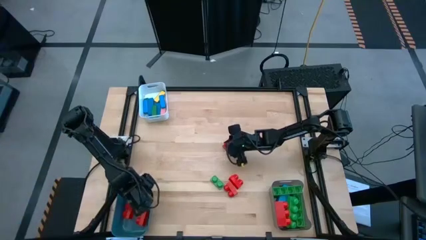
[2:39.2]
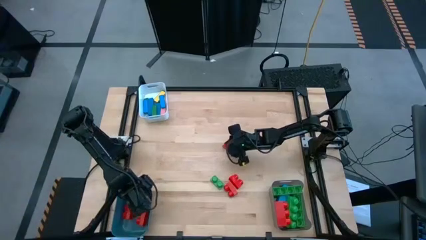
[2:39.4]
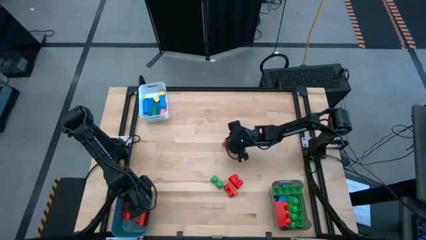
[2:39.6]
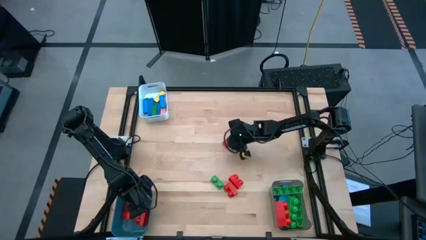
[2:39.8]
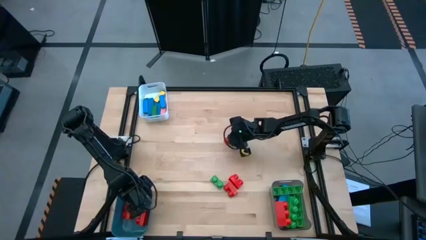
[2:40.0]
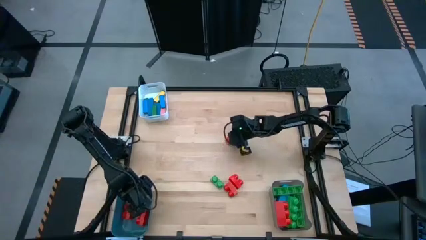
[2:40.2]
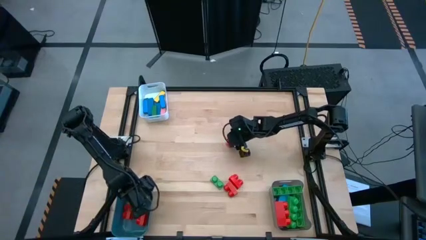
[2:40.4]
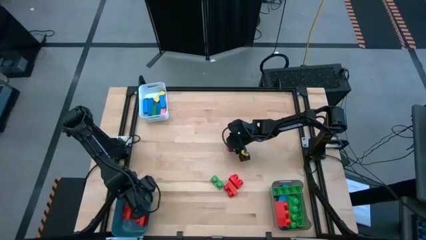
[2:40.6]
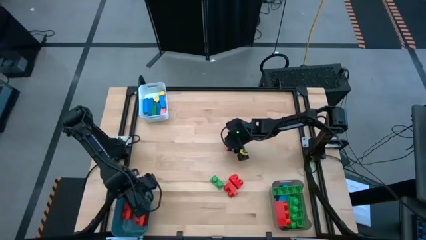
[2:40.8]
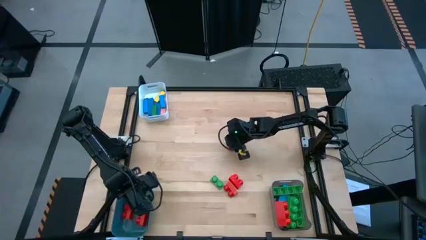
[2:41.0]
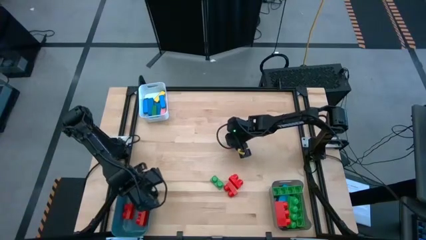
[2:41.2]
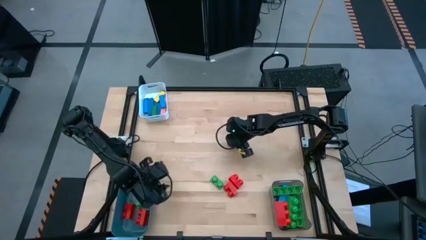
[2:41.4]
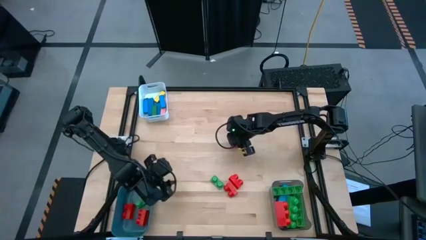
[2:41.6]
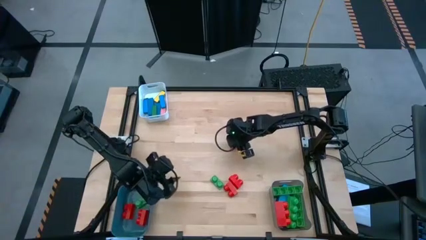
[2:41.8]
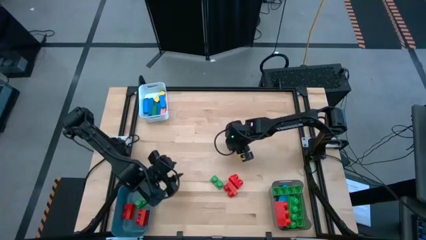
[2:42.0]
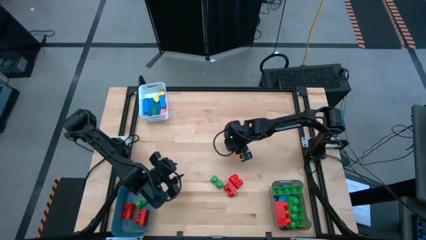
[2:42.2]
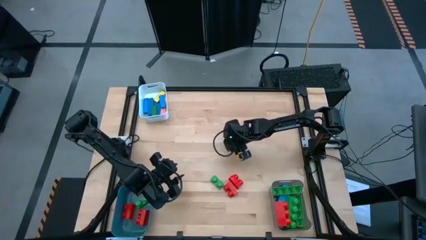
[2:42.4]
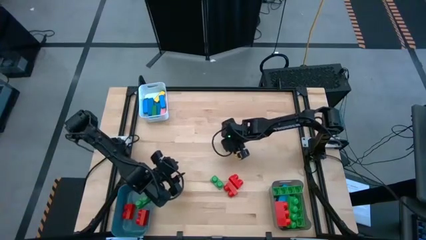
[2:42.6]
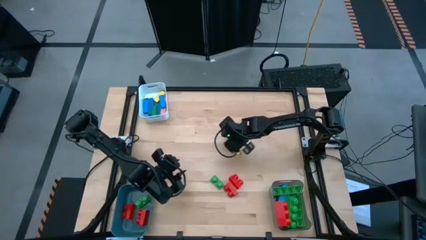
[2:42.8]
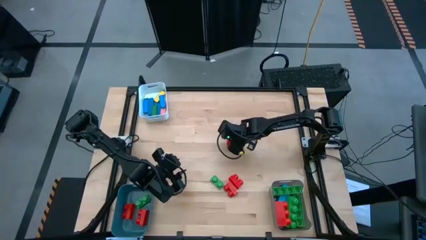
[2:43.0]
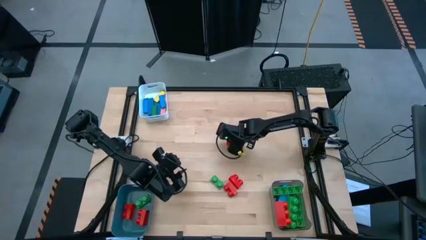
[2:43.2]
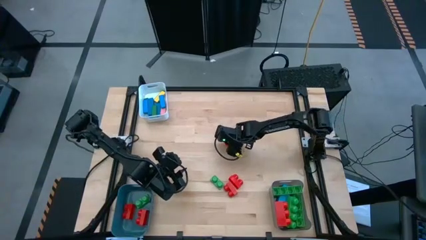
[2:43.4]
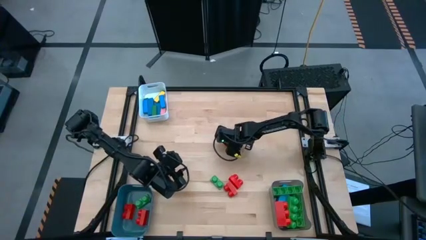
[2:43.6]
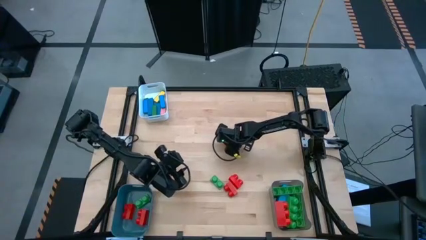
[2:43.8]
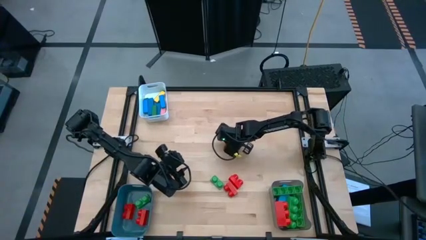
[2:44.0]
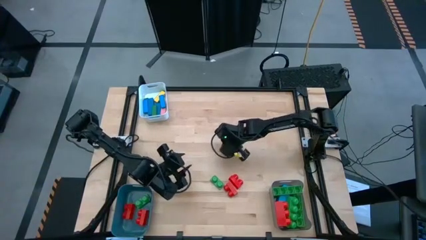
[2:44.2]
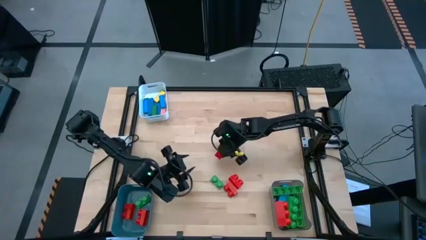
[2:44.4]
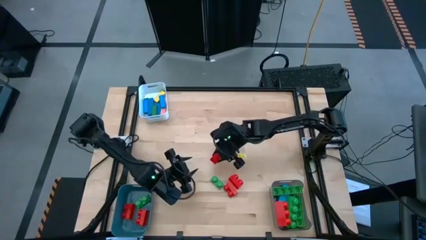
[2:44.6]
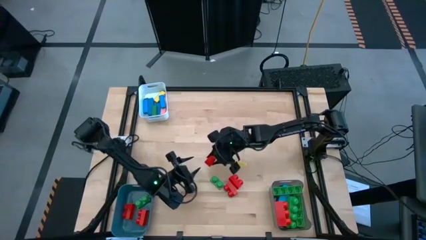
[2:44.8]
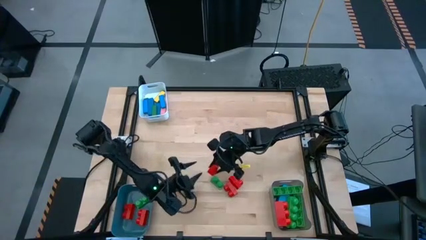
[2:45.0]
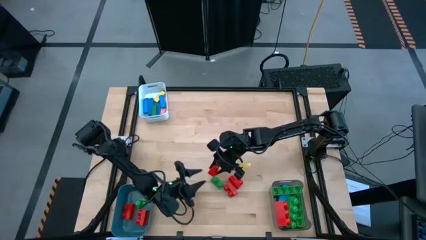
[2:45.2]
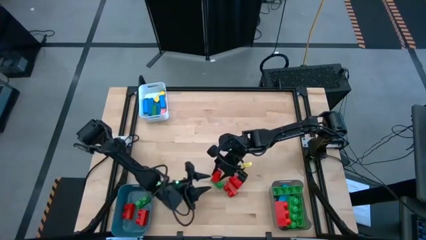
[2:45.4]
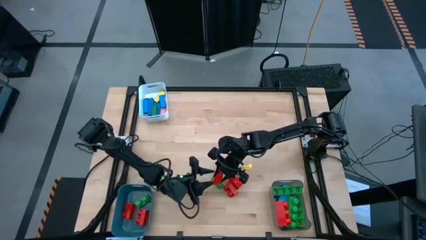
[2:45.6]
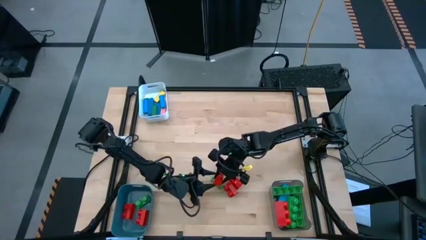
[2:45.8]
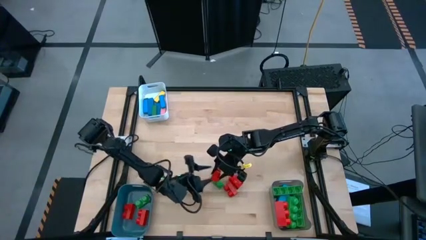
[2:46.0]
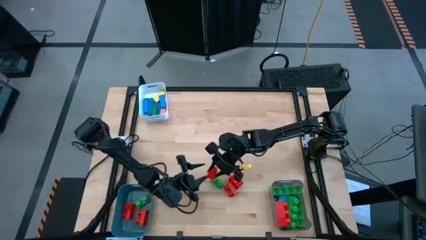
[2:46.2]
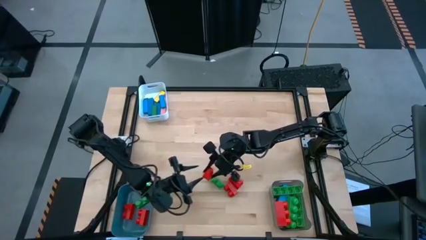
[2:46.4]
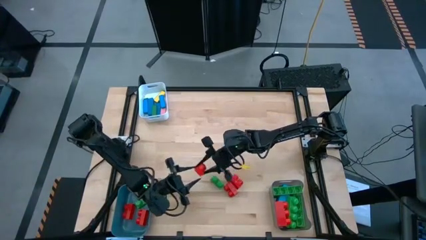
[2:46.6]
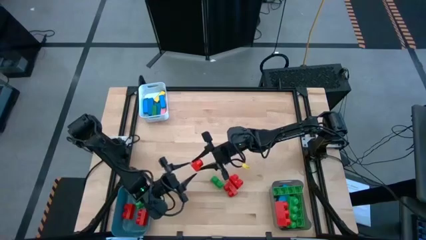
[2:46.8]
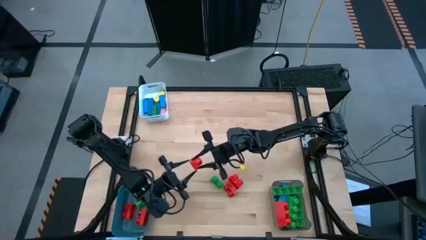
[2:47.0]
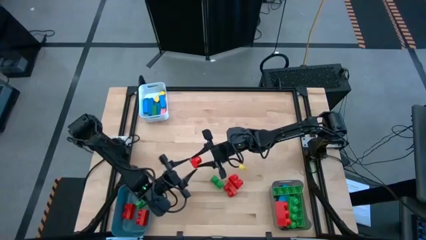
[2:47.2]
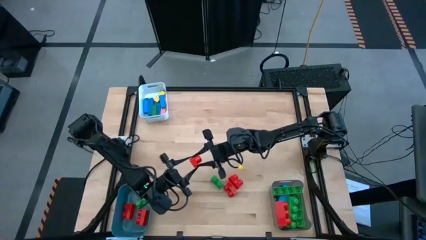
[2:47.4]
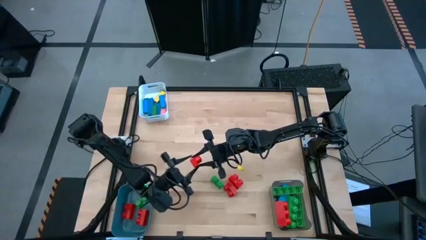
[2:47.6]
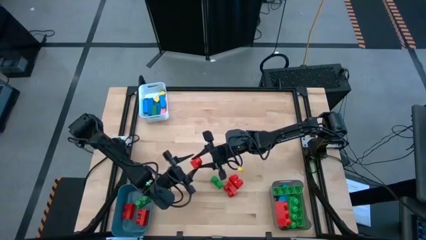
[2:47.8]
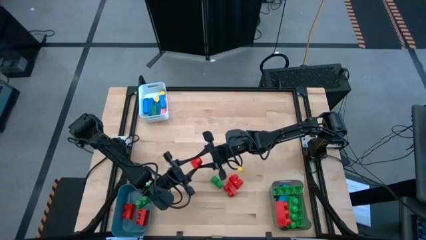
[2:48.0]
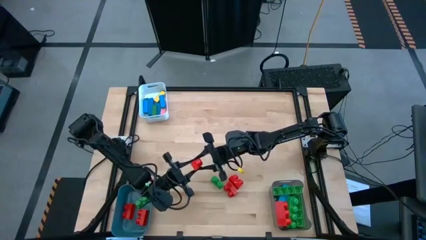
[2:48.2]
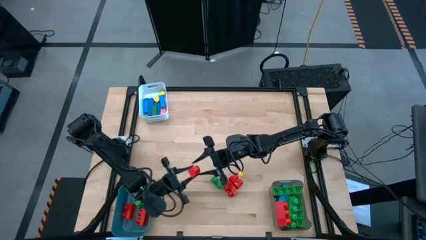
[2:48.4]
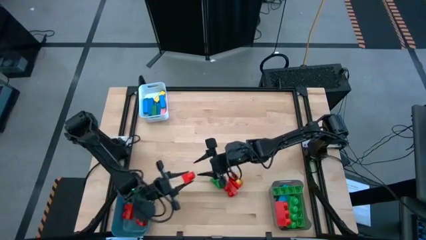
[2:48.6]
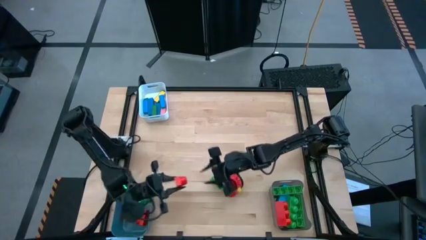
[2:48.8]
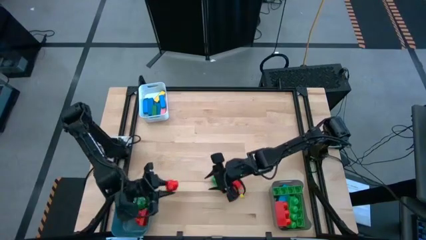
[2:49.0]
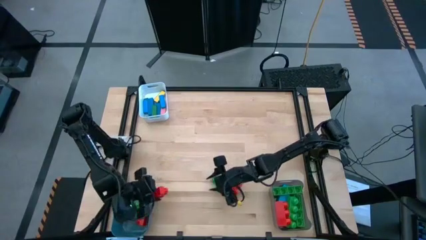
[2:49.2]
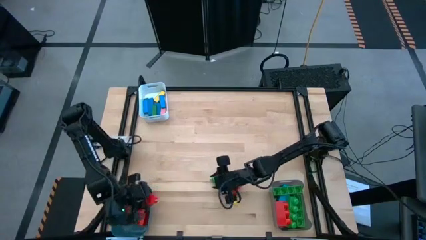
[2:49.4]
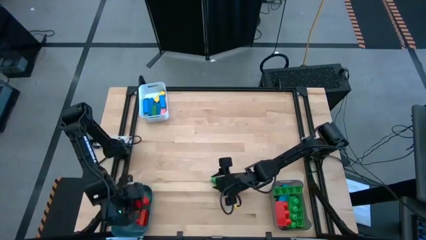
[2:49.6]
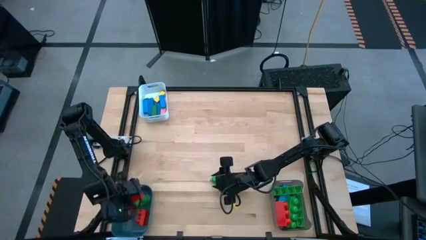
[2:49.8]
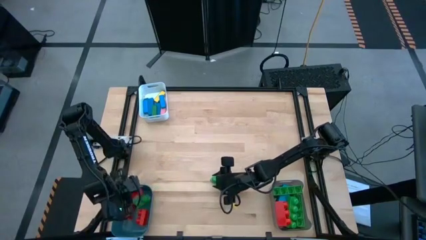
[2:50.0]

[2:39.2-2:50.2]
Task: Sort blocks by size
Put the red 2 stud gamepiece into the blue bin

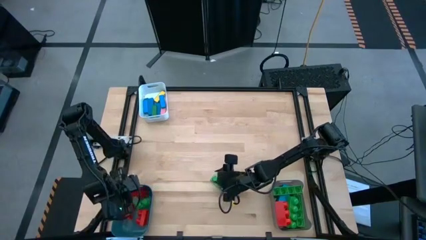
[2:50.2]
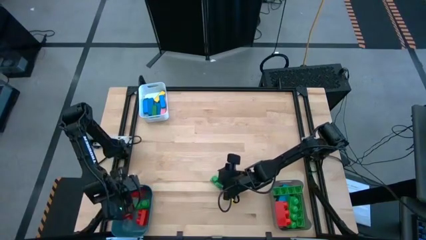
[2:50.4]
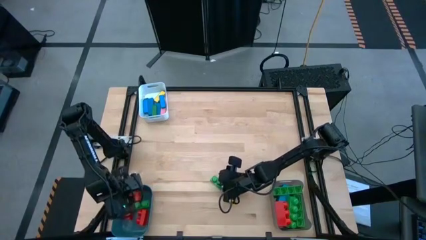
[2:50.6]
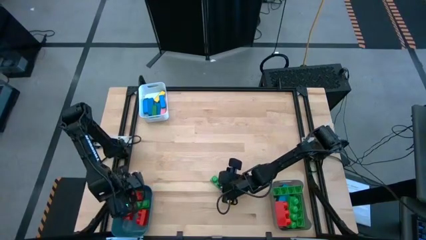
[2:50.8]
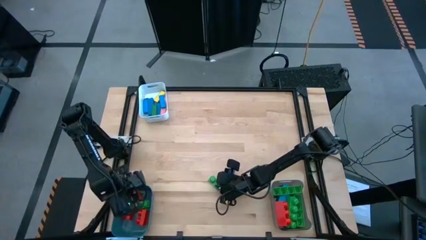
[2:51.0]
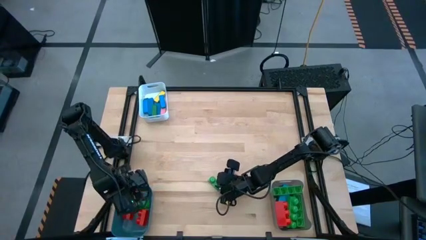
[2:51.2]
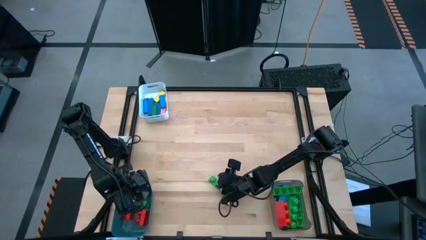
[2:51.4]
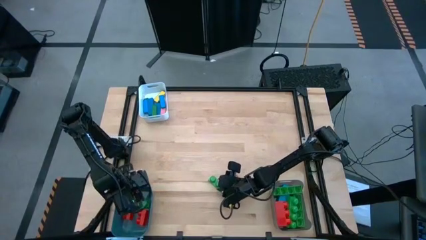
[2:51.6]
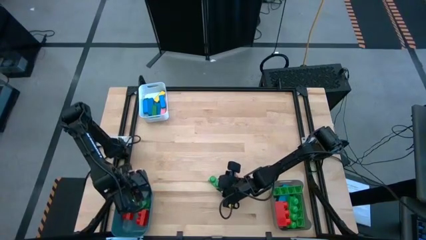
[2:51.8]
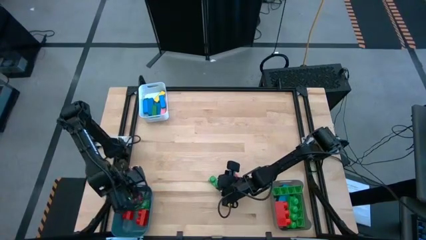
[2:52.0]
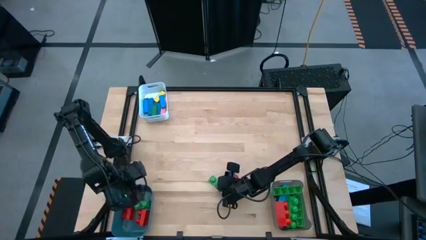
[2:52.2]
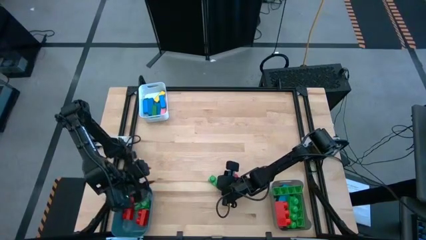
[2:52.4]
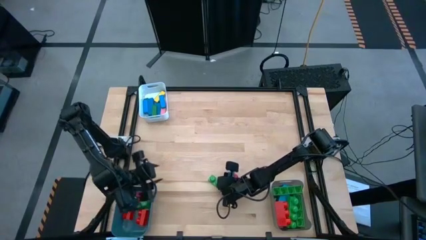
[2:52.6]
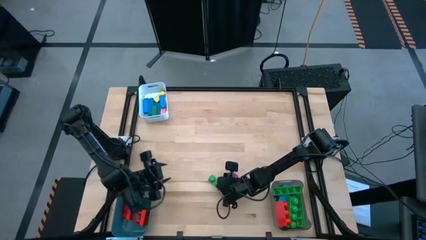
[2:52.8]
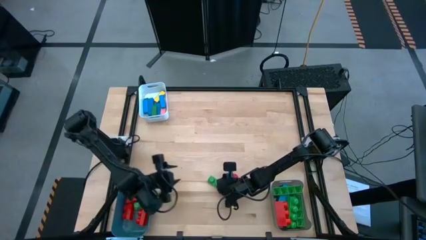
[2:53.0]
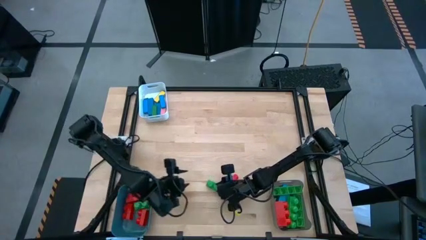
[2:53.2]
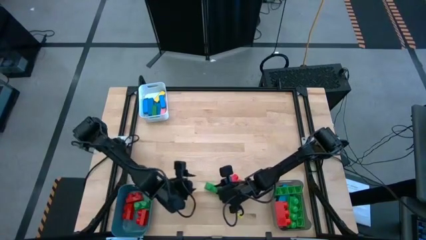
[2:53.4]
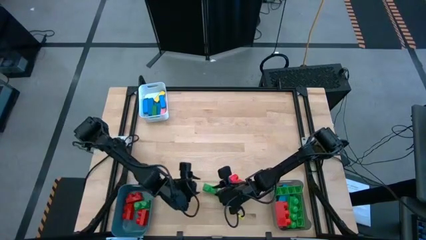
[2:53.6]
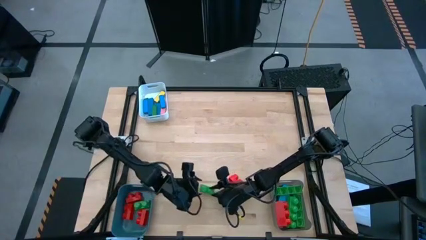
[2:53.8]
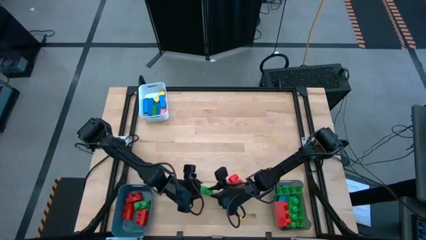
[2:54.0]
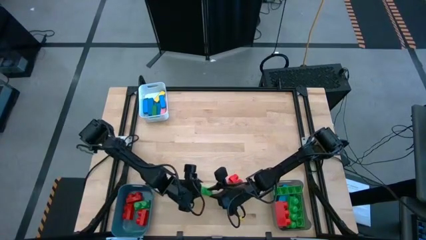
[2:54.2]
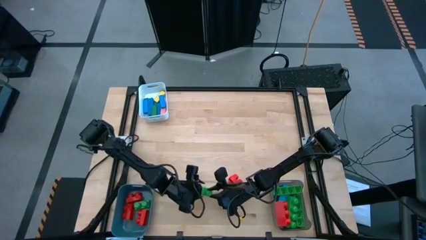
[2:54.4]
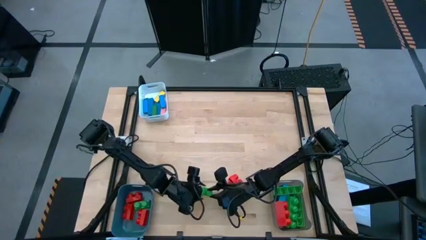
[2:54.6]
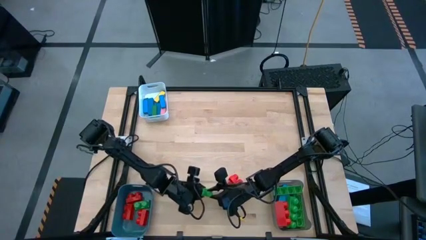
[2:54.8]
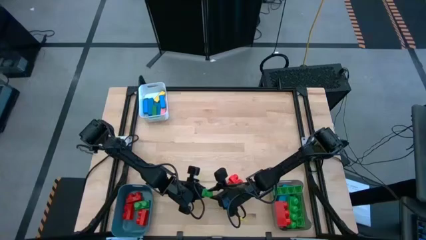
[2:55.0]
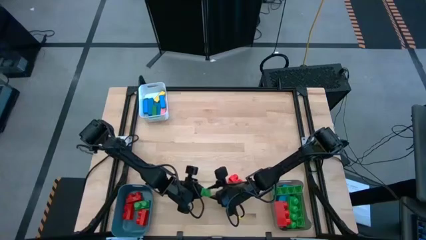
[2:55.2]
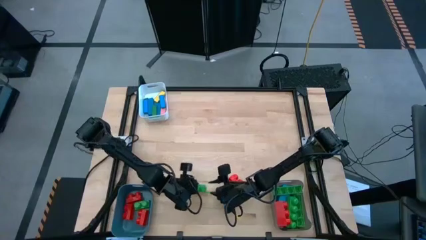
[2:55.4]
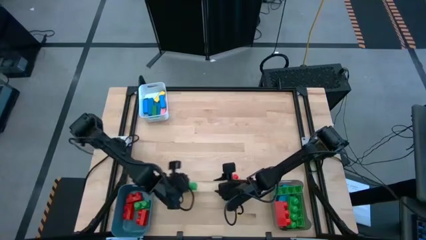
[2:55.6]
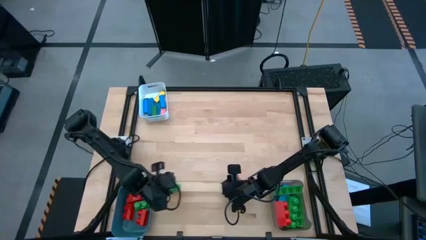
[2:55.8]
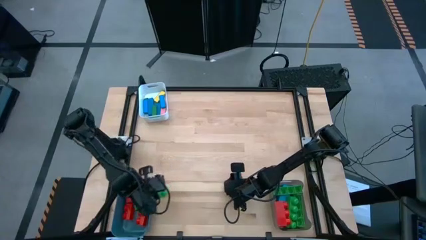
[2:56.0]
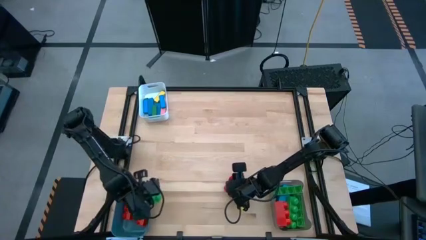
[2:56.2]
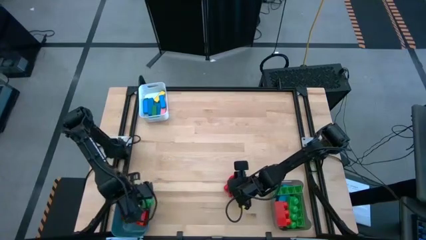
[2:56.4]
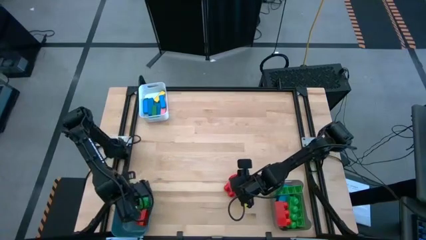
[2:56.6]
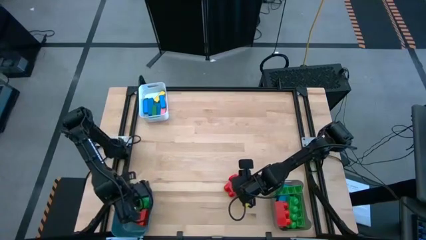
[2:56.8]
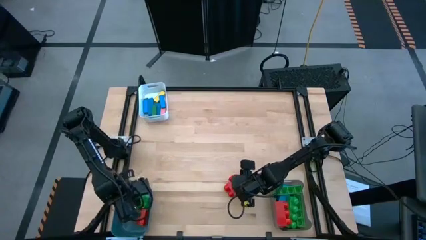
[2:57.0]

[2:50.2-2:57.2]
Put the green 2 stud gamepiece into the blue bin
